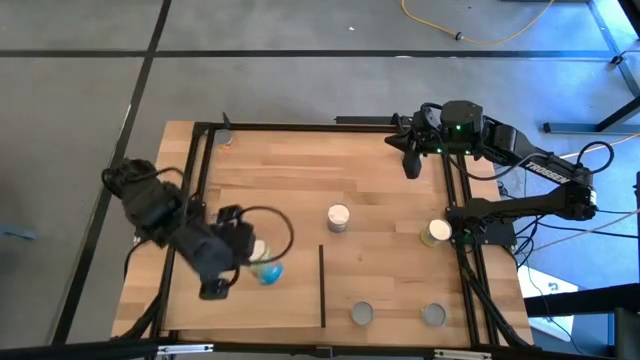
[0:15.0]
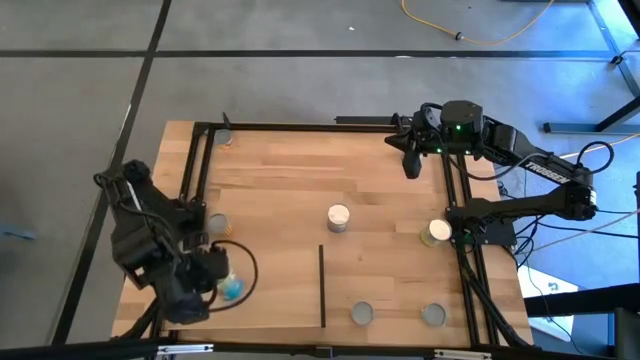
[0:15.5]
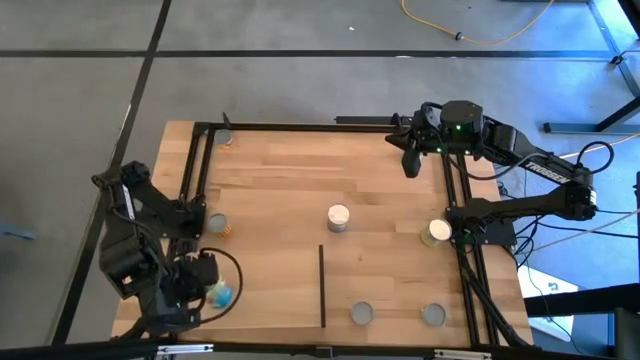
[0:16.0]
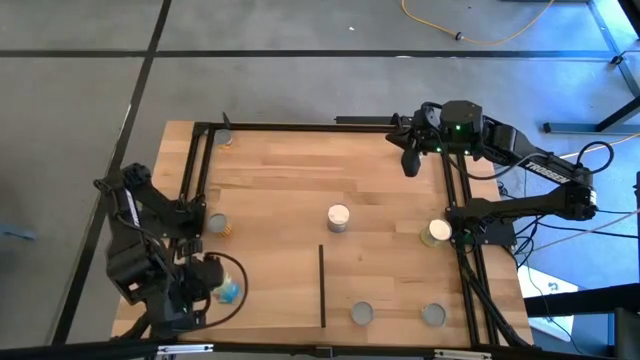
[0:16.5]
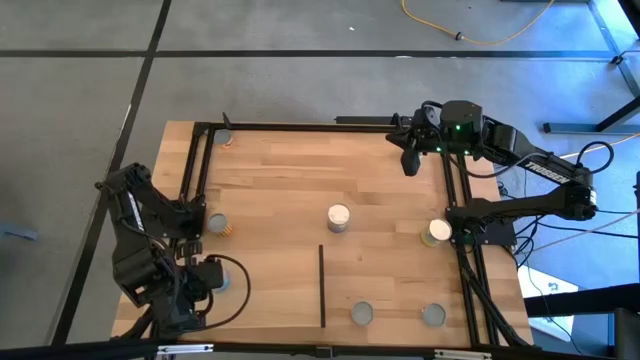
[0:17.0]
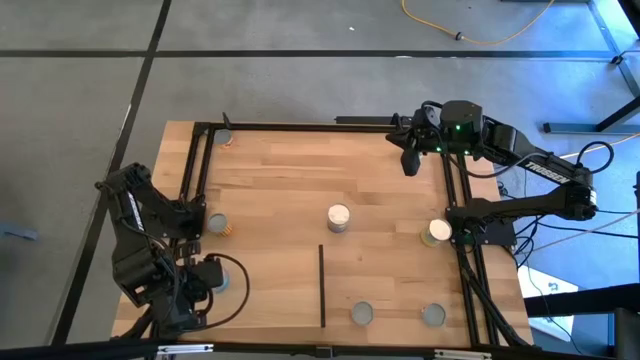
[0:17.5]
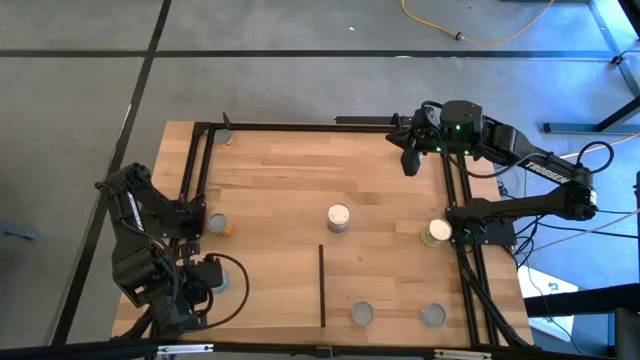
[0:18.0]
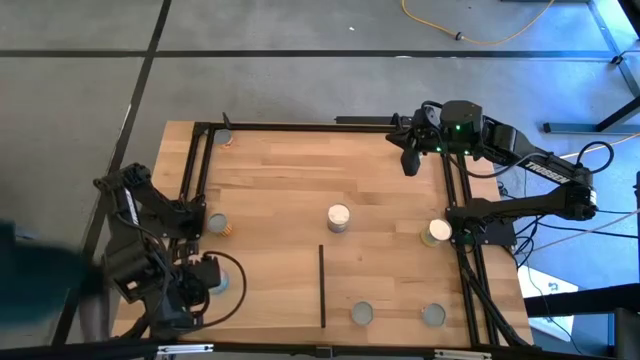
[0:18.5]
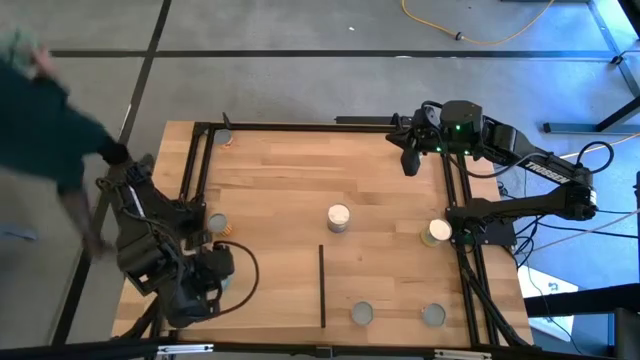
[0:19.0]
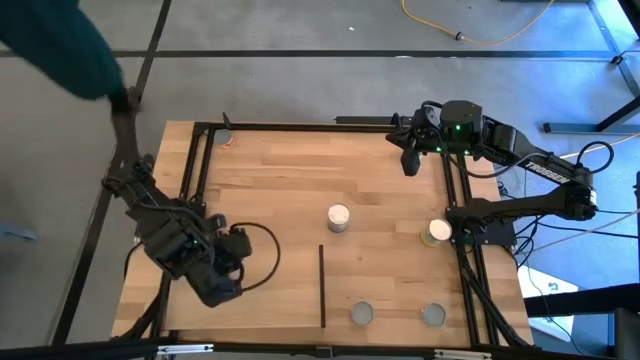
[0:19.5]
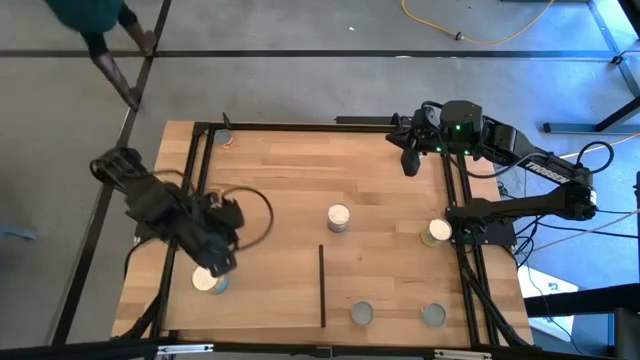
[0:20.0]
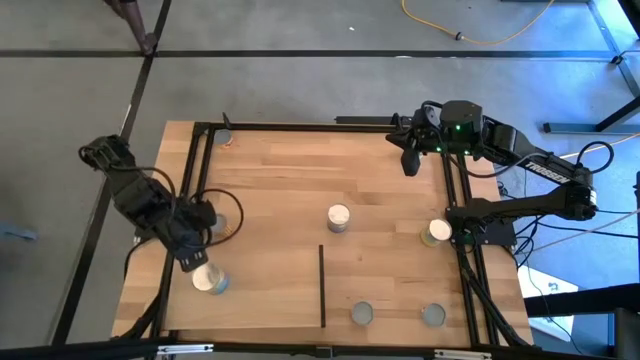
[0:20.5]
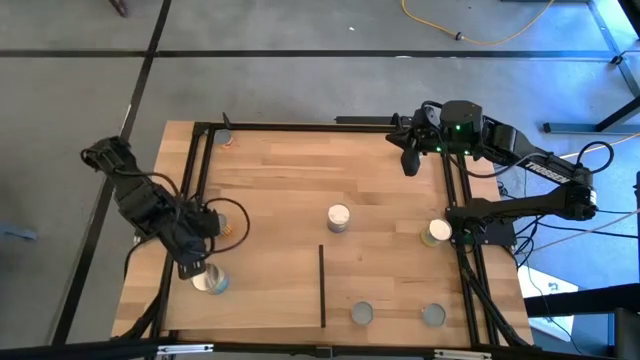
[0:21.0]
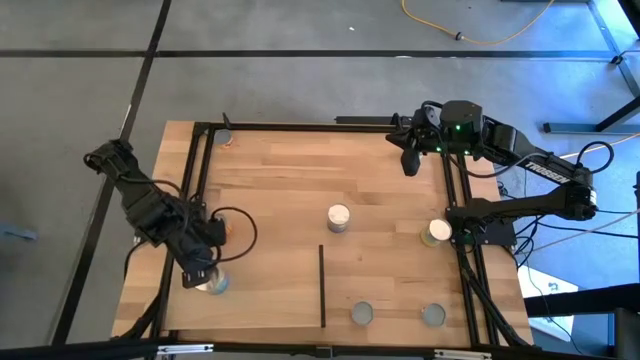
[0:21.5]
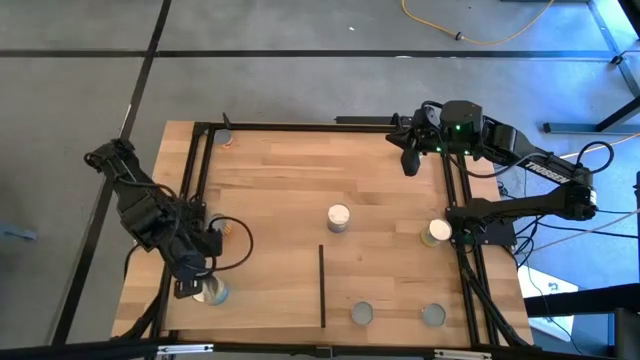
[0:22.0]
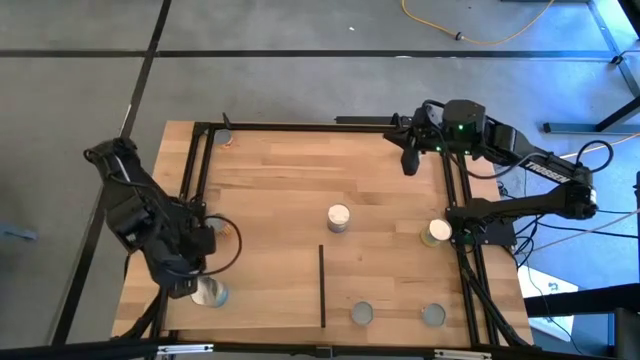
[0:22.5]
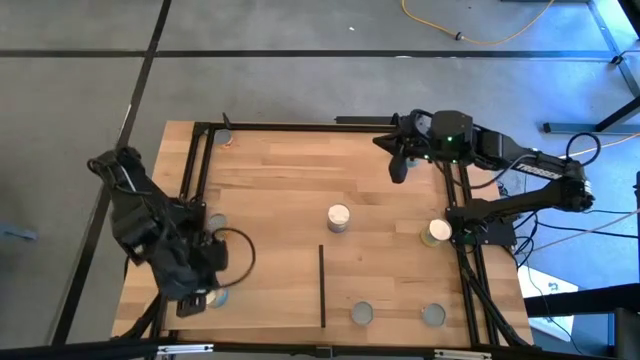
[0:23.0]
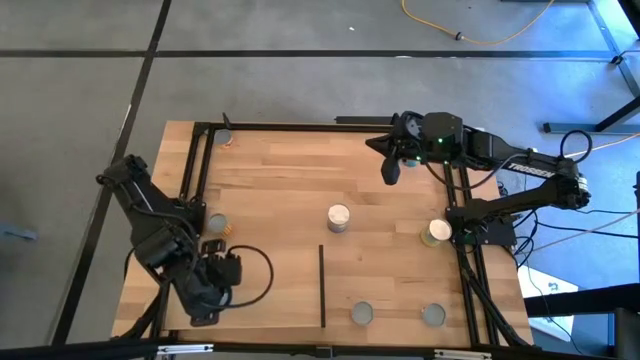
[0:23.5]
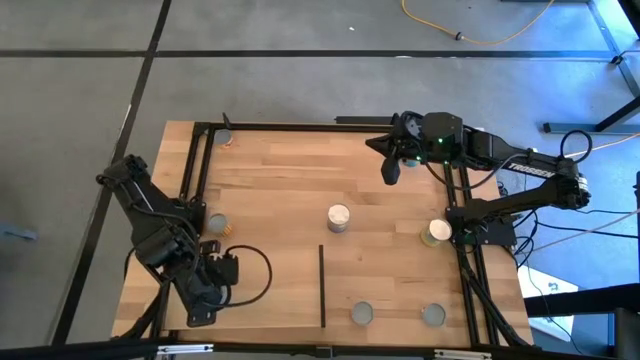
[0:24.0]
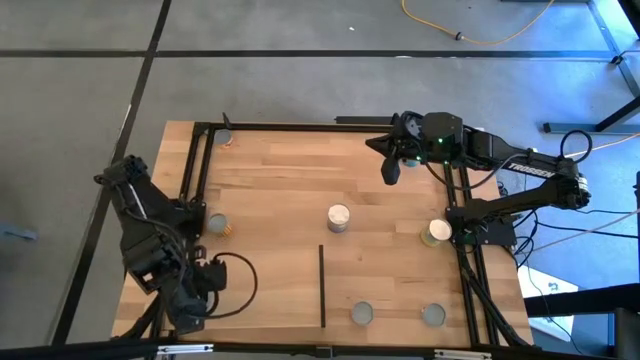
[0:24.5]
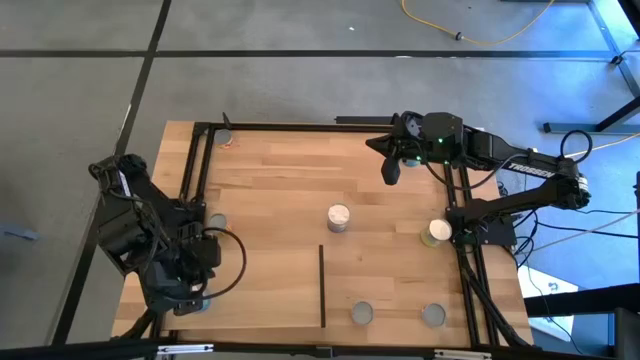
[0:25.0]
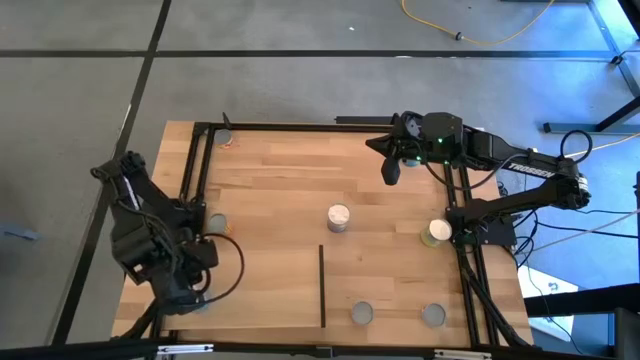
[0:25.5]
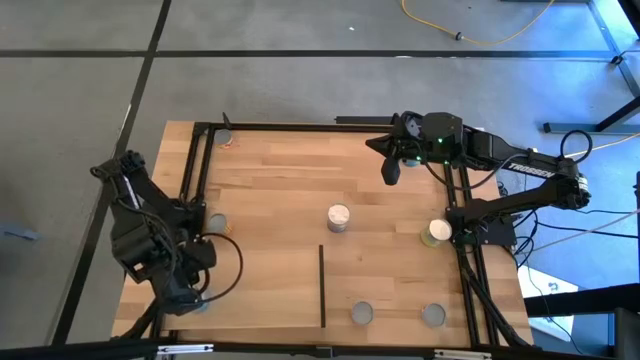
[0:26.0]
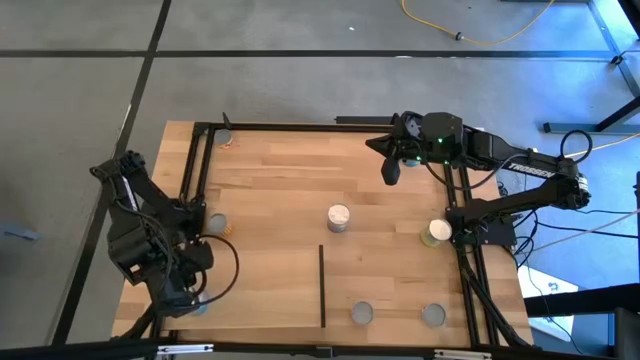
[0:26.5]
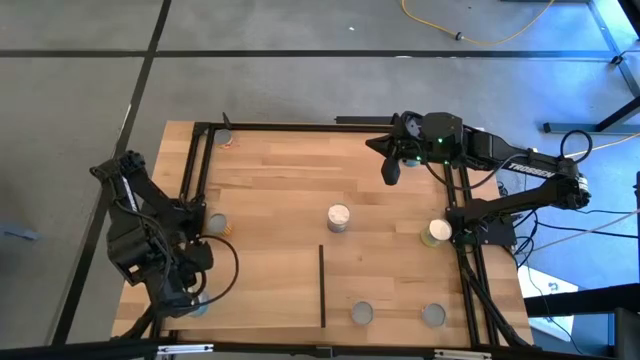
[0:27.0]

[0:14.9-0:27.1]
Task: Pick and place cans onto a shelf
Put the left canned tomato on the shelf

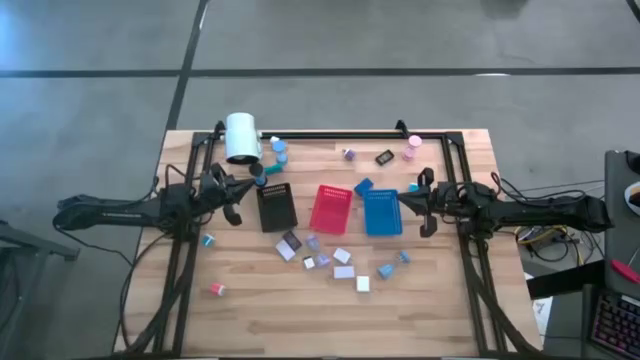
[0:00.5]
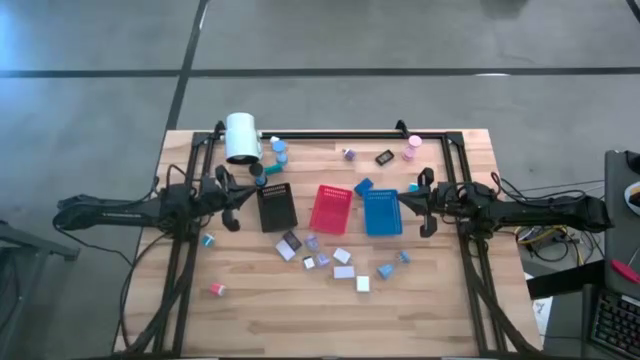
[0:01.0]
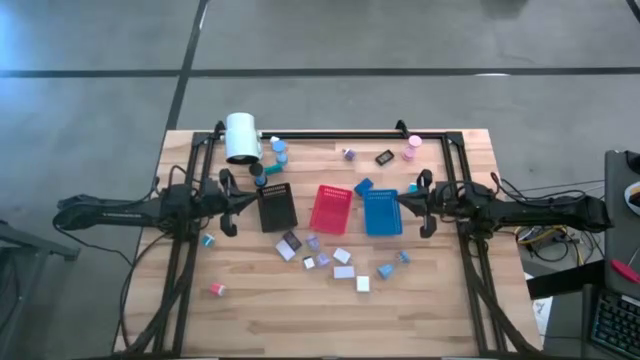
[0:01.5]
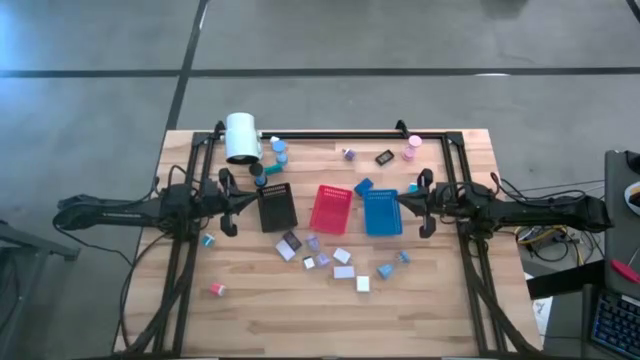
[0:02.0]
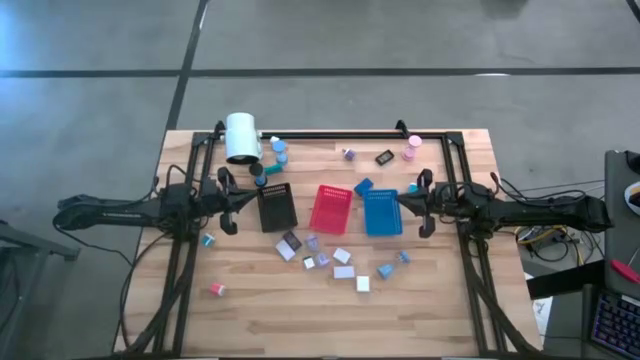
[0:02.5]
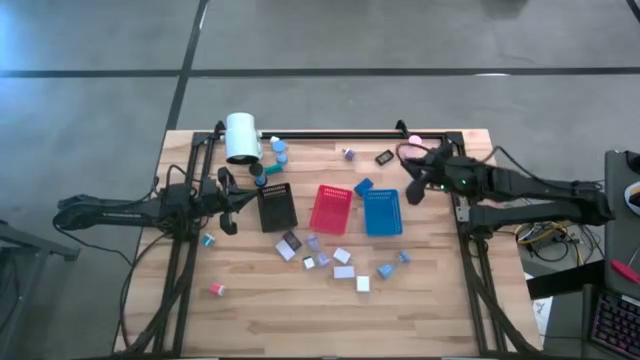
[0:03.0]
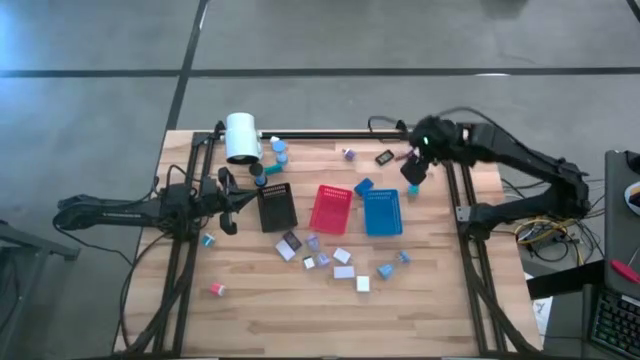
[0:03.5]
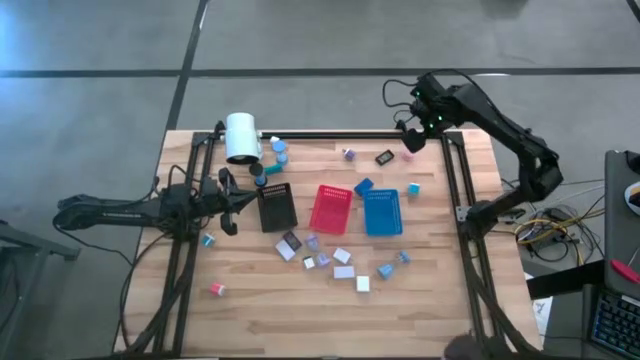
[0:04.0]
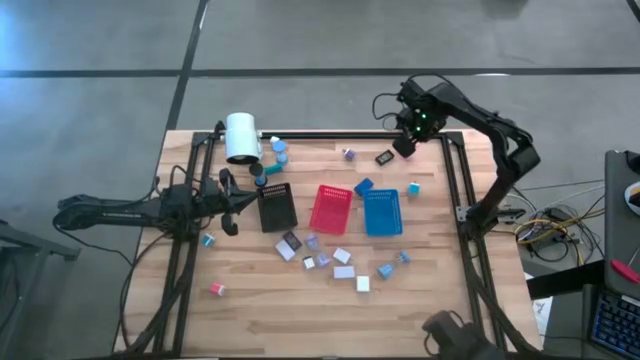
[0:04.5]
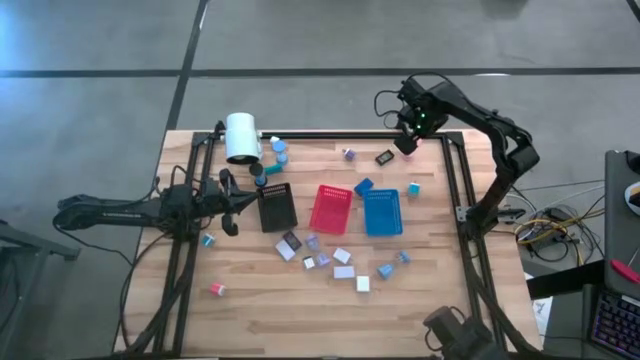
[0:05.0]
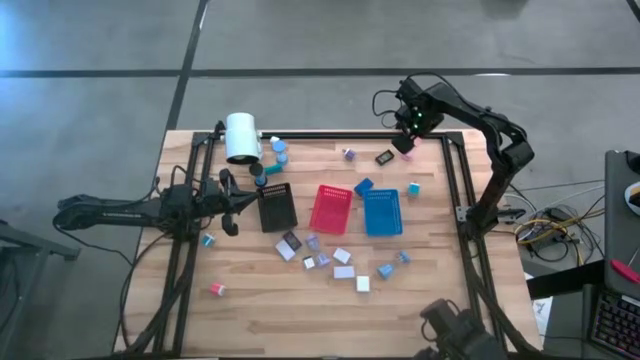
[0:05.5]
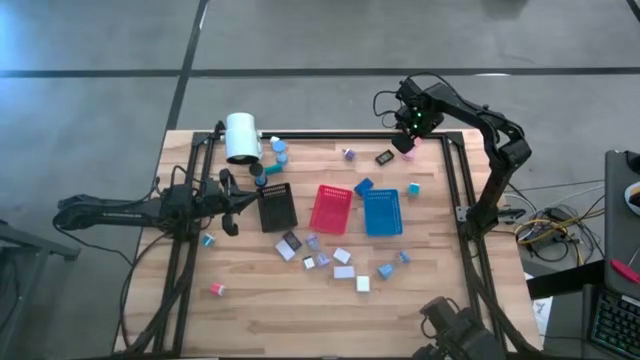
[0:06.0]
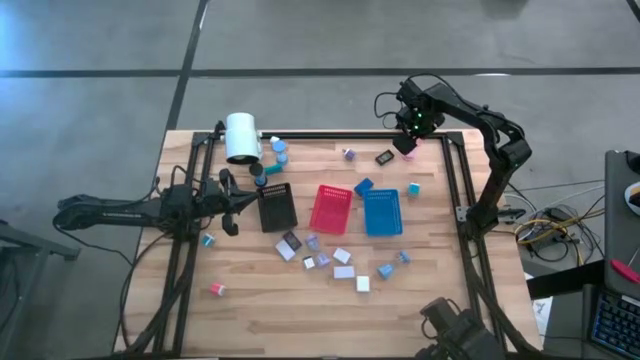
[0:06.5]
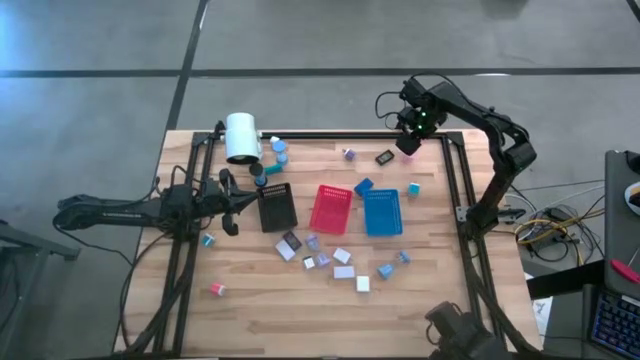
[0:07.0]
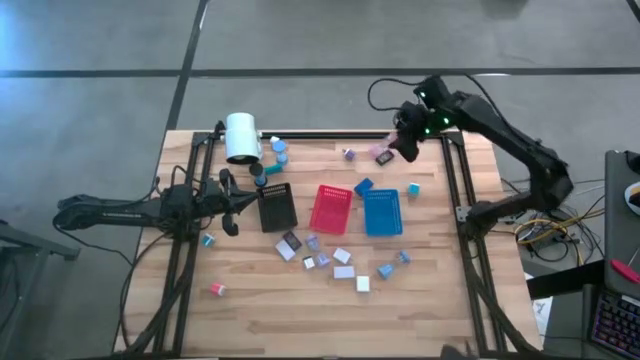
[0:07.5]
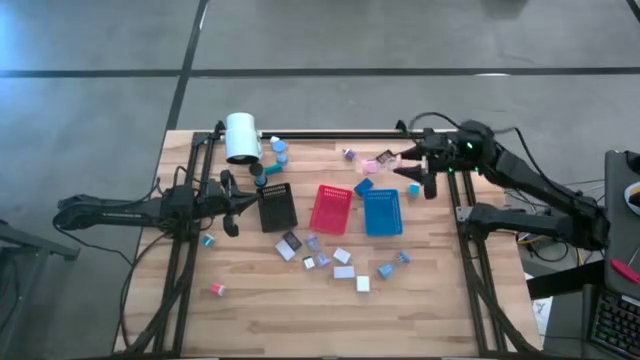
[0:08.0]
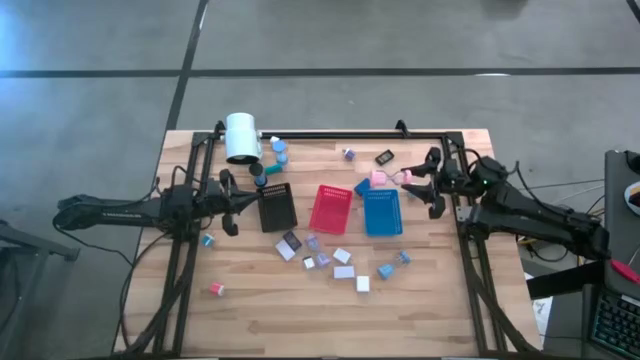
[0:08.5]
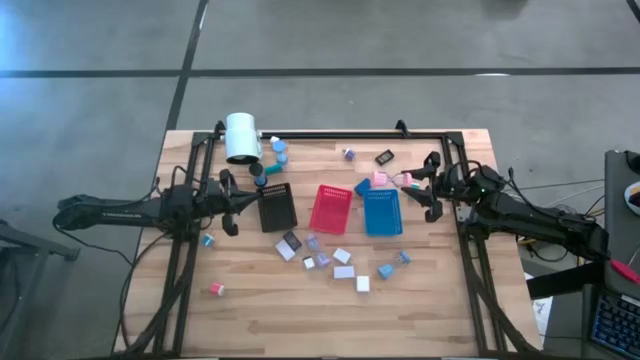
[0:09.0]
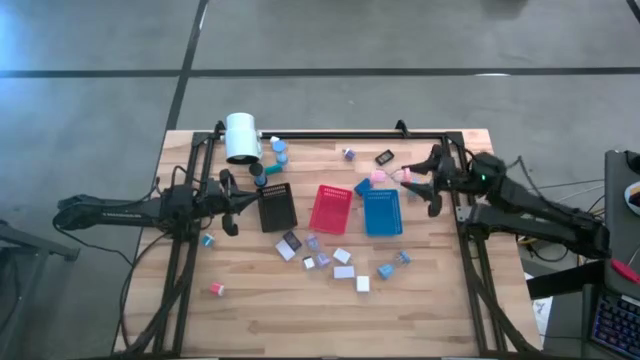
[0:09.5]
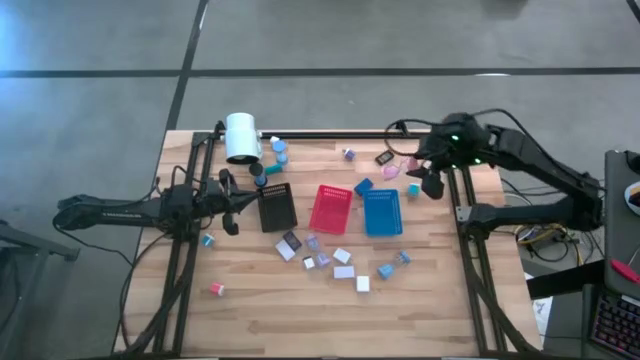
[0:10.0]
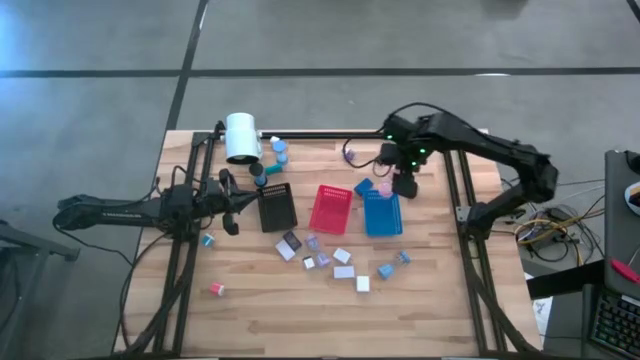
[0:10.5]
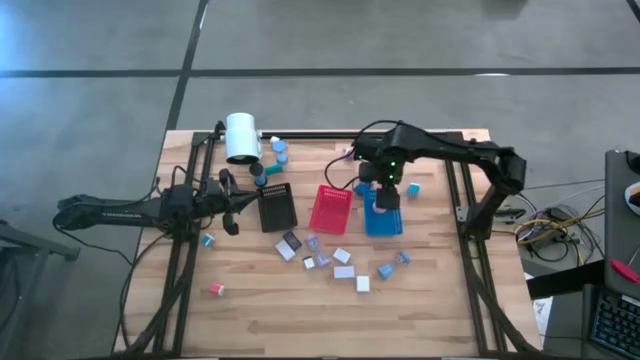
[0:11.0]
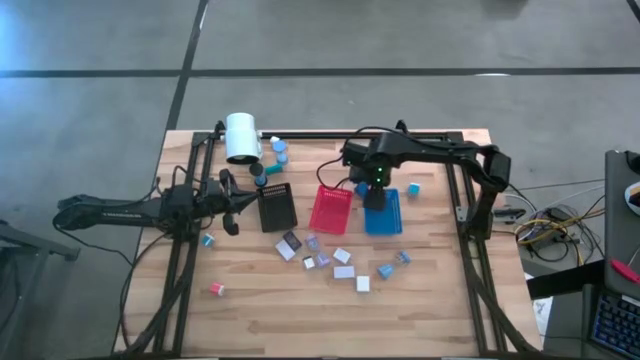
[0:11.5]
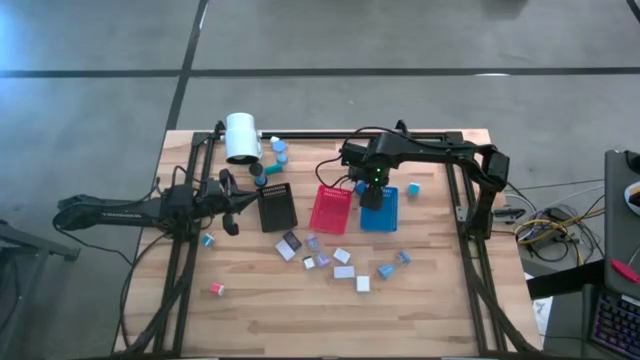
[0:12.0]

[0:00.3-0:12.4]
Task: Pick & Place Office items
Put the pink hourglass into the blue bin
